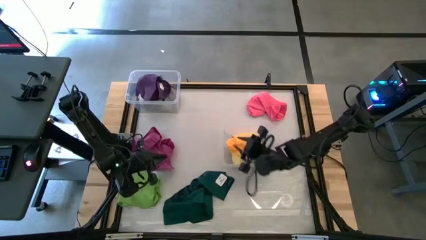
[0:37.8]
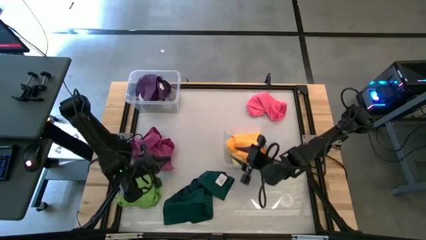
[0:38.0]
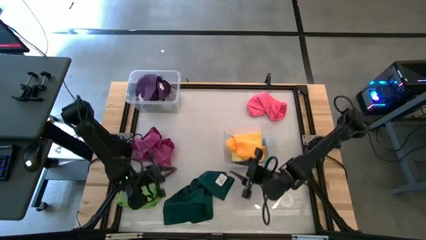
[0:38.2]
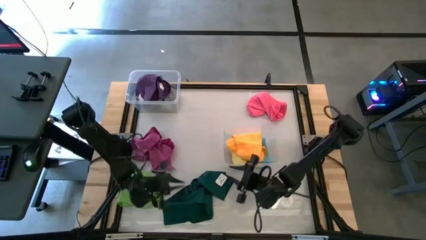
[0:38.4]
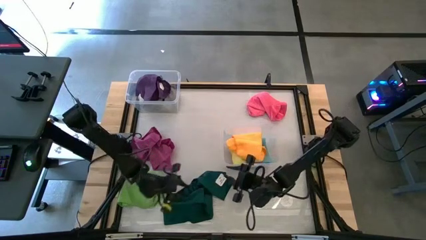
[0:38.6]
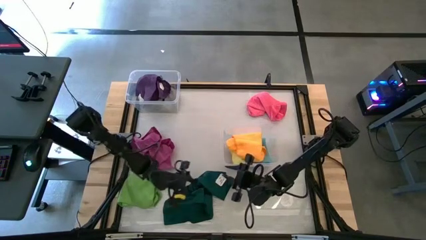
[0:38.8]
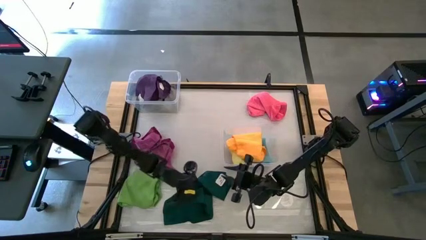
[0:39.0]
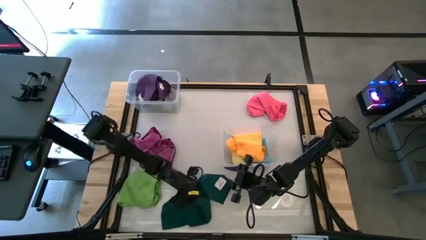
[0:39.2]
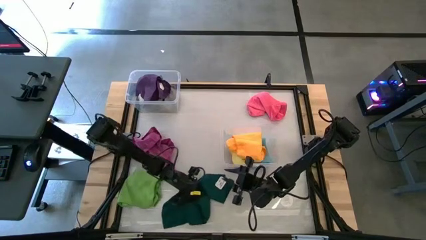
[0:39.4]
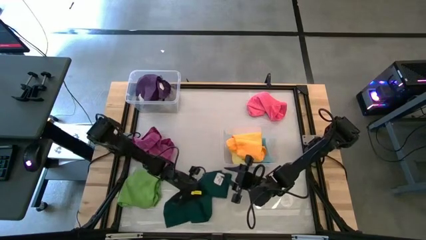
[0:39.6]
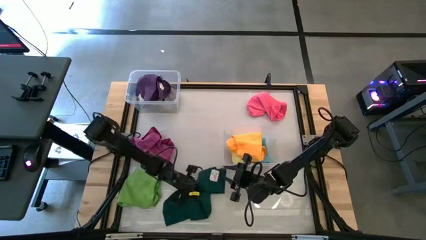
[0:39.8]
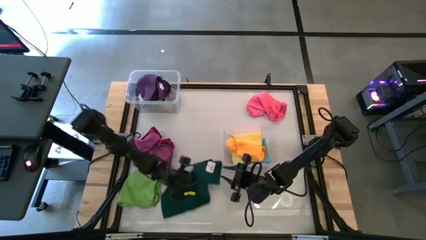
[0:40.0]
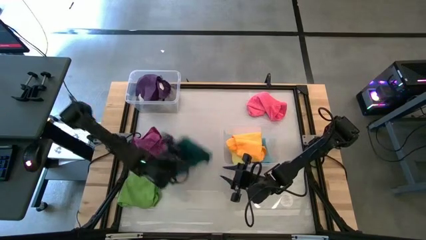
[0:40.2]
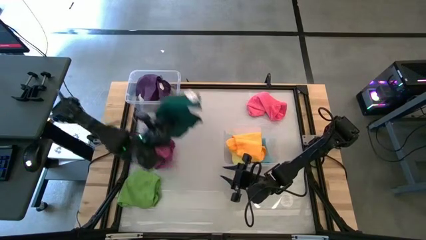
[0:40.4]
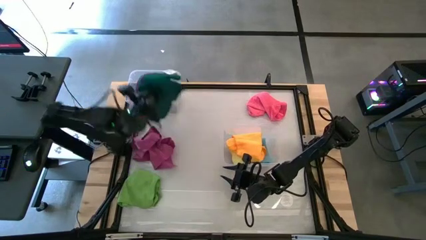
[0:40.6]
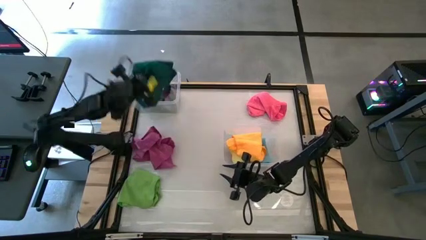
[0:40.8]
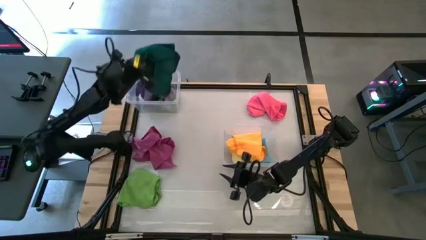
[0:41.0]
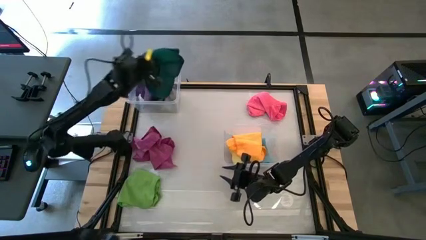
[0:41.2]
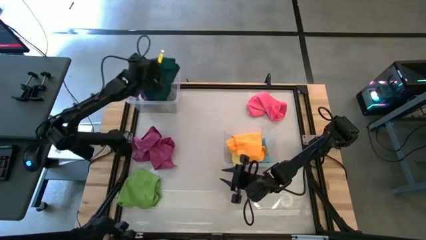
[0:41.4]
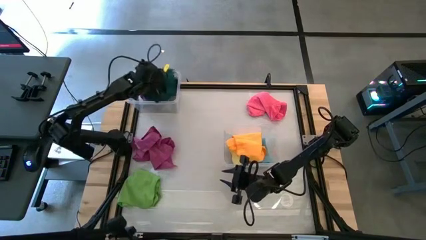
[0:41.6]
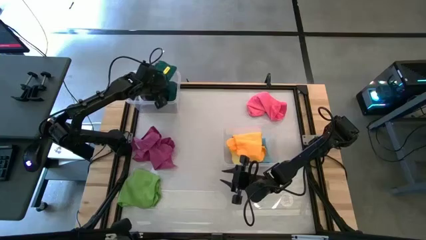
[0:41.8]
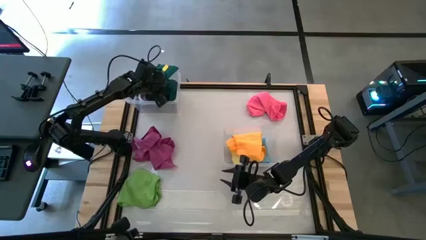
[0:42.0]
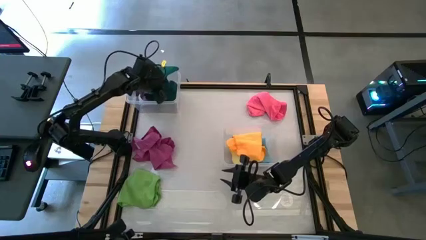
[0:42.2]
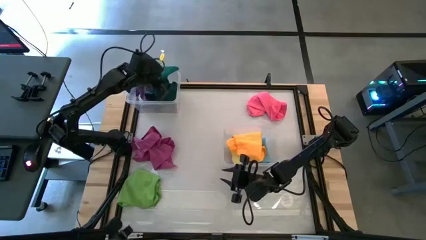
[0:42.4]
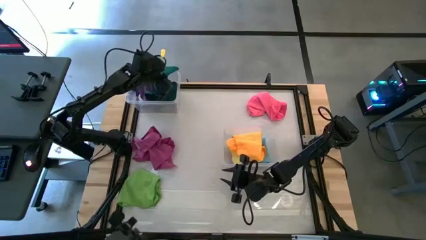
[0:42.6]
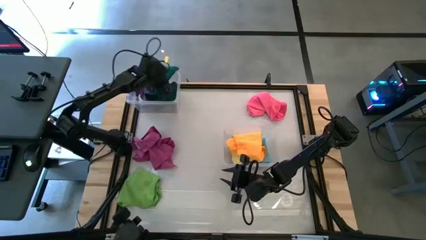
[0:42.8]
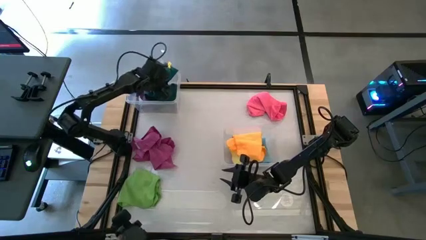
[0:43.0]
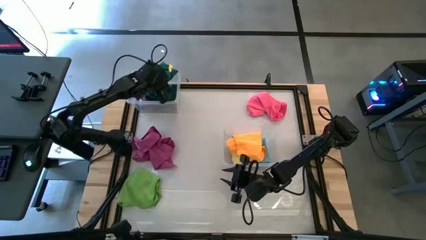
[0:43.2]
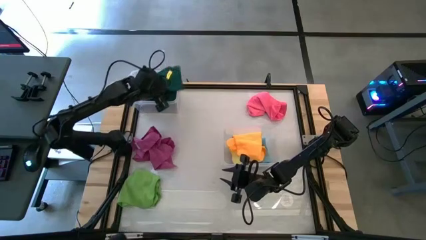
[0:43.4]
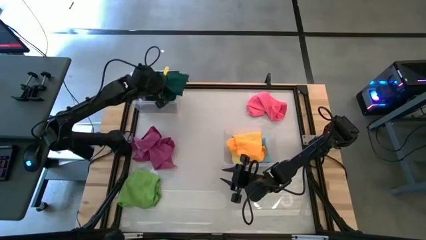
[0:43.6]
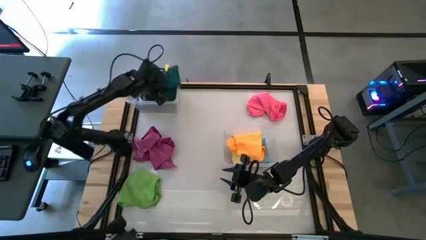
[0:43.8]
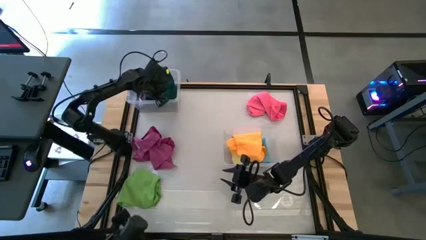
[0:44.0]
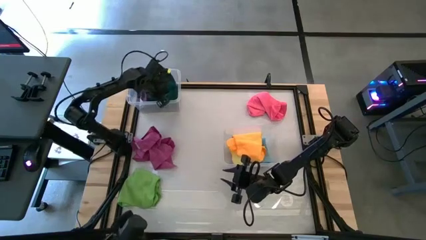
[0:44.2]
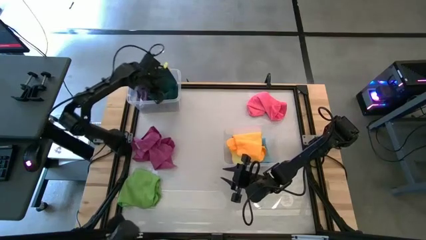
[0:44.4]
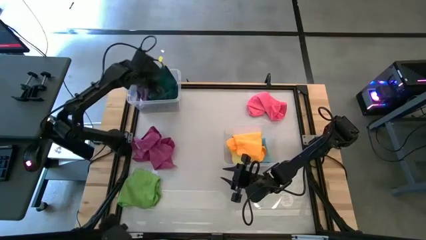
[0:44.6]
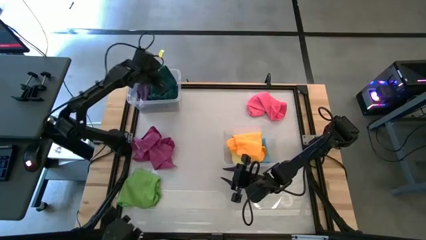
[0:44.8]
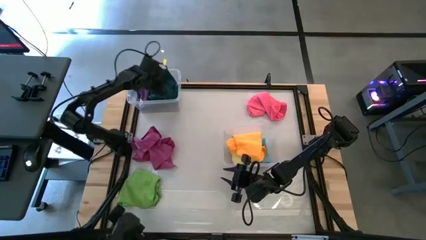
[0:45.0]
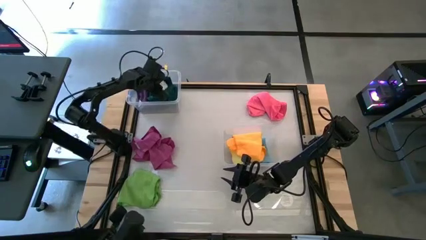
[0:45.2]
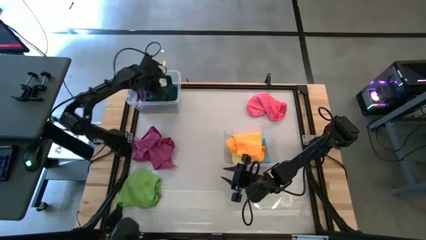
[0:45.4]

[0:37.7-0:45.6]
Task: Sort towels by color in basket
Put the dark green towel into the top transparent bin

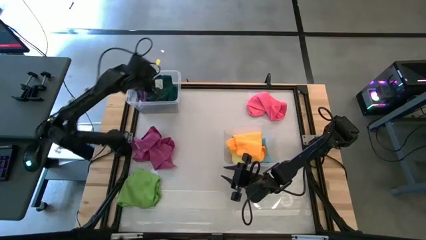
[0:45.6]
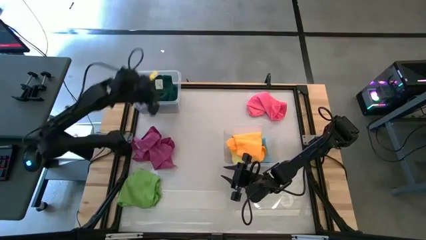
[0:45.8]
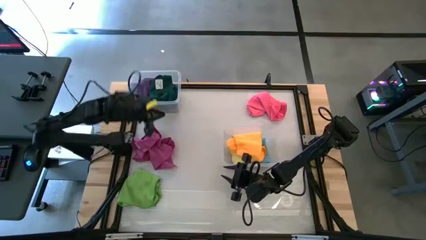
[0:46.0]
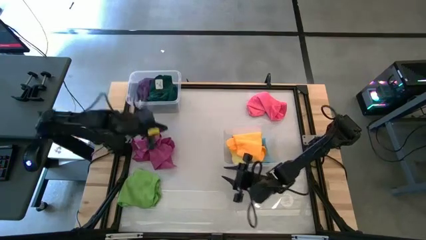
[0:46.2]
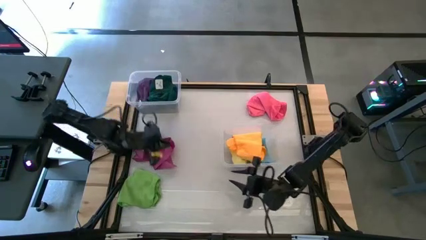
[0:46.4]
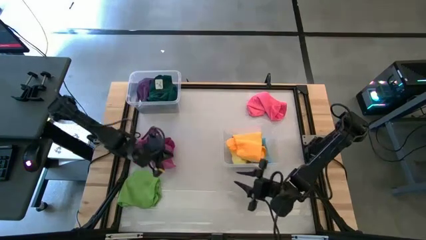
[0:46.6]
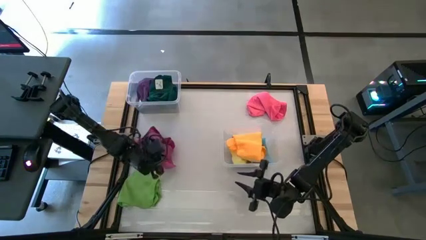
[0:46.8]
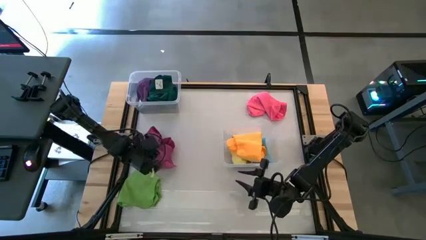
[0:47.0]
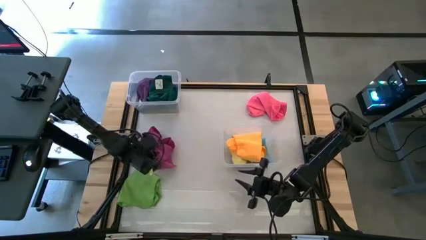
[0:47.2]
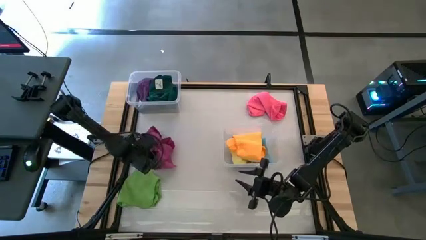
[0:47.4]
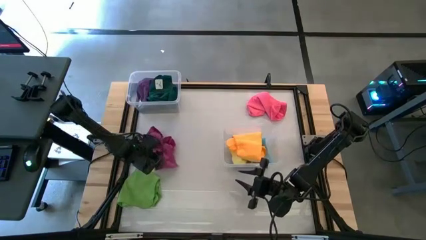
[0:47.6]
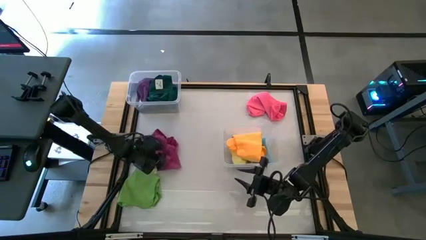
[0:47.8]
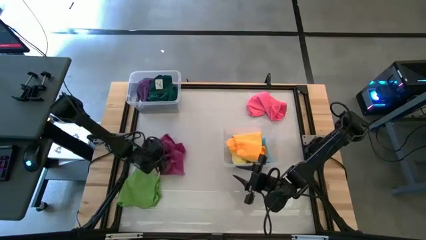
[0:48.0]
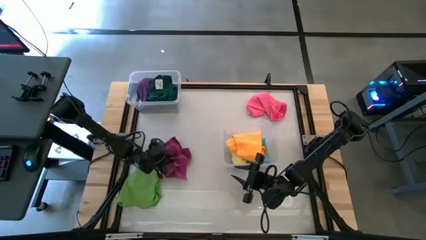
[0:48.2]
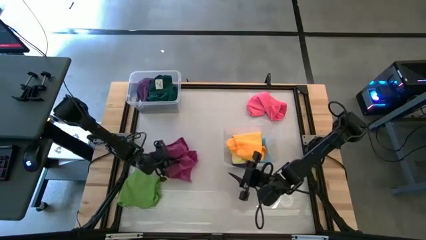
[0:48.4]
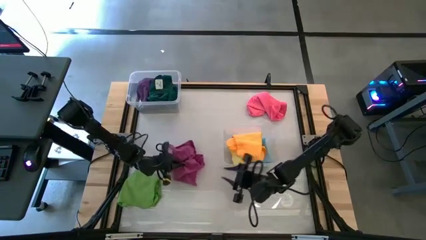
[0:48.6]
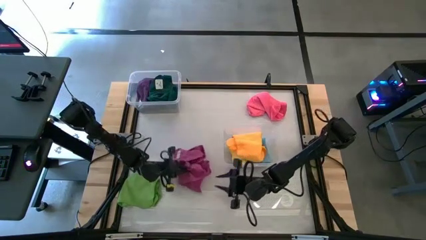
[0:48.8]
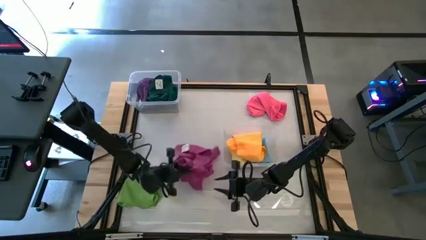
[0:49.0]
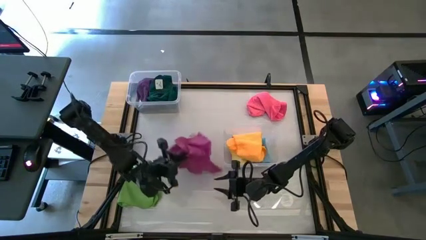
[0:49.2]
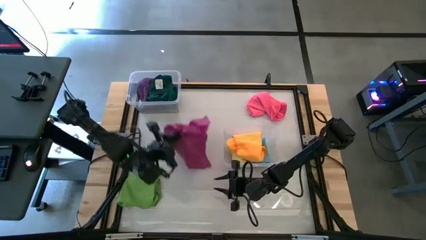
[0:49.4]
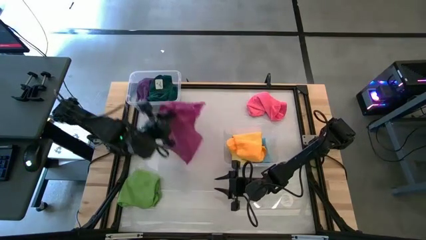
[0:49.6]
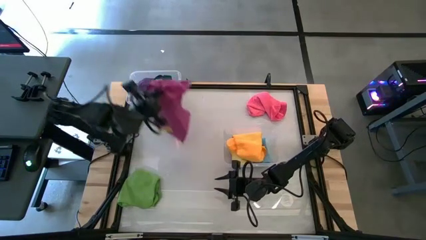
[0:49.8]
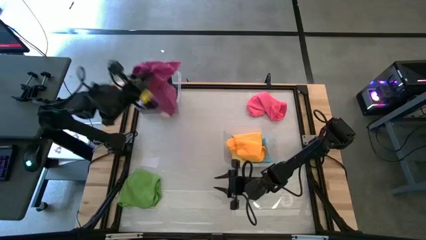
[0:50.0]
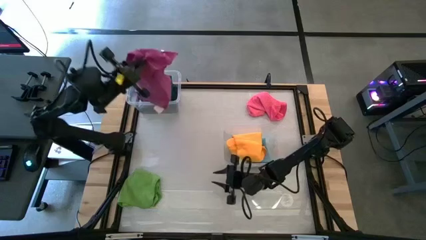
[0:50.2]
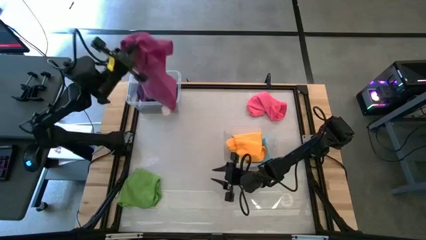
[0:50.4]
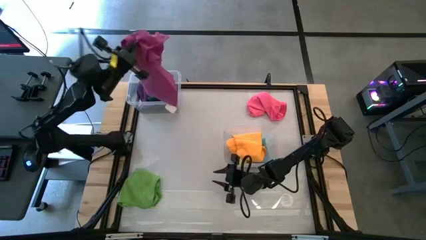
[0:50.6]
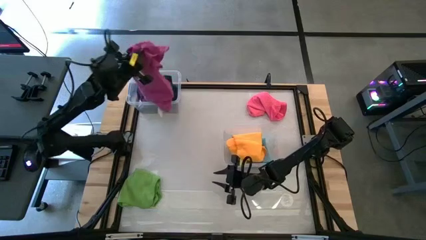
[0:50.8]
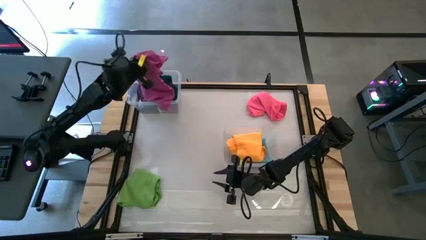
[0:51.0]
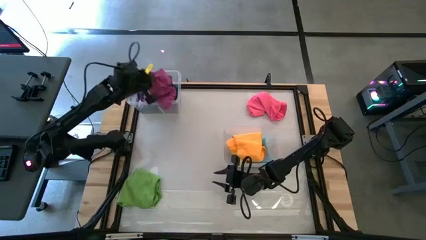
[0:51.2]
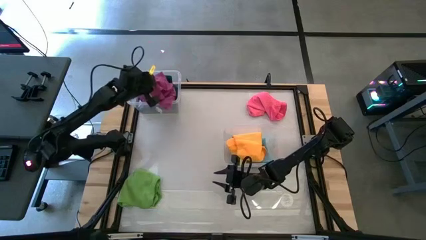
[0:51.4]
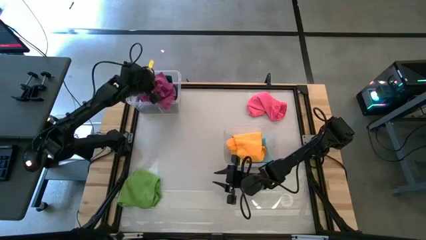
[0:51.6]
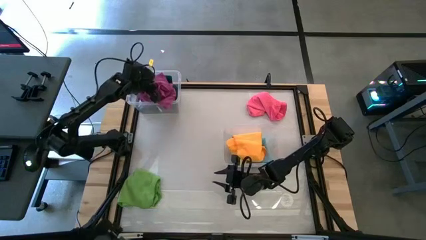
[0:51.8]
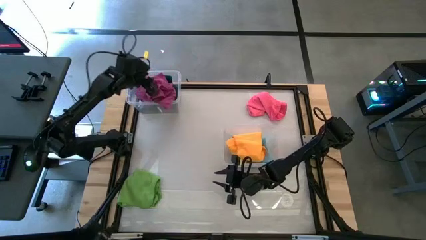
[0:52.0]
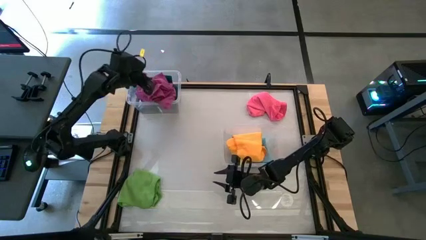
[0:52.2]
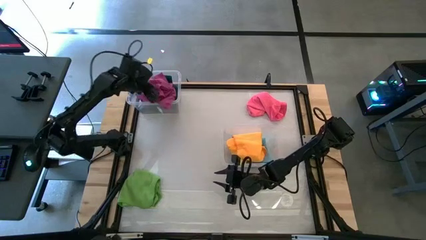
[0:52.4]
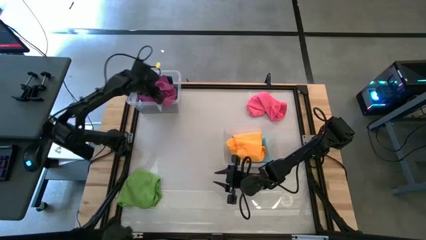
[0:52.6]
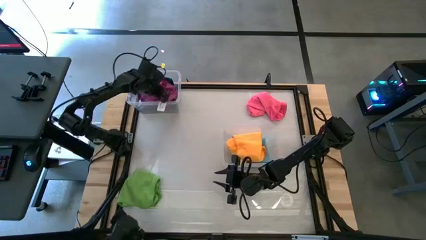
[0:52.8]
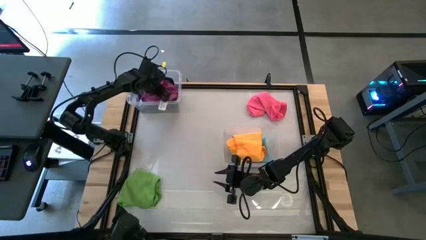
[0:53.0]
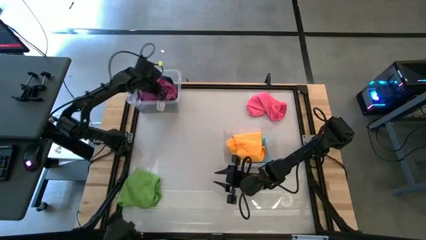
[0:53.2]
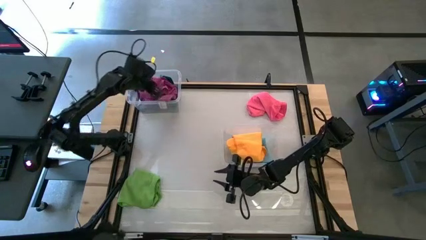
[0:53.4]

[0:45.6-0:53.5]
Put the dark pink towel into the top transparent bin
